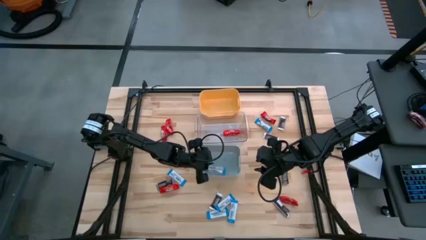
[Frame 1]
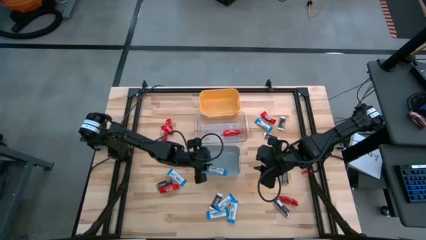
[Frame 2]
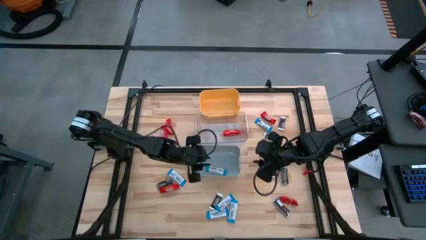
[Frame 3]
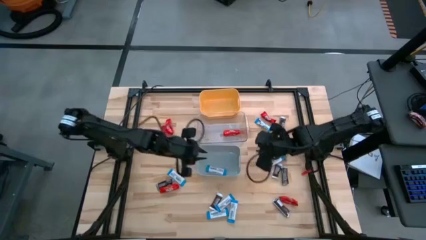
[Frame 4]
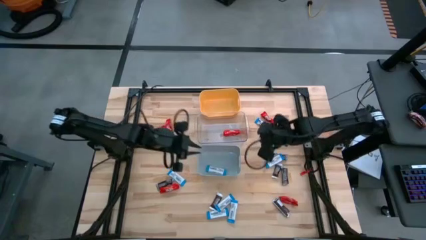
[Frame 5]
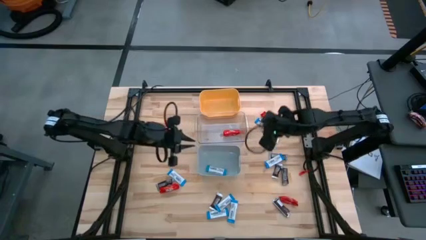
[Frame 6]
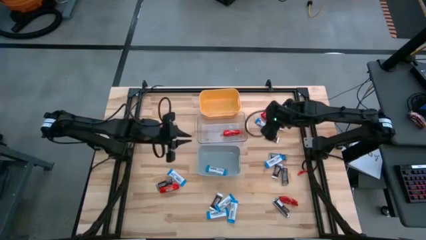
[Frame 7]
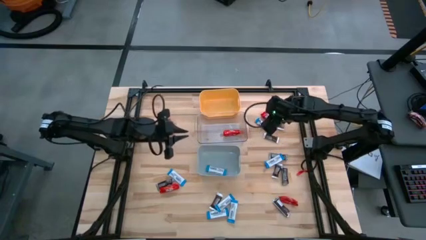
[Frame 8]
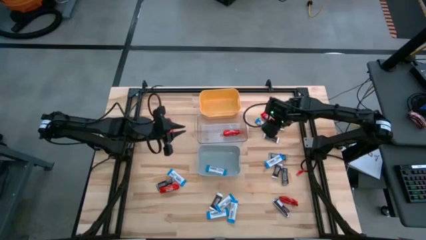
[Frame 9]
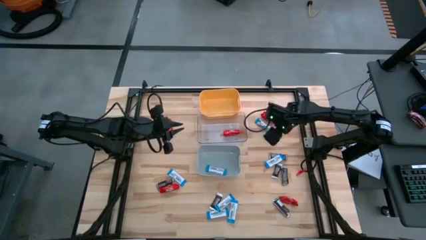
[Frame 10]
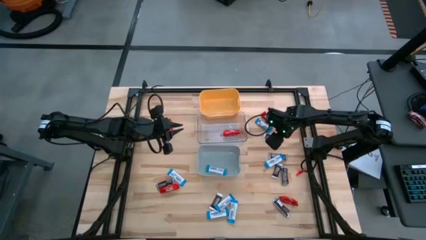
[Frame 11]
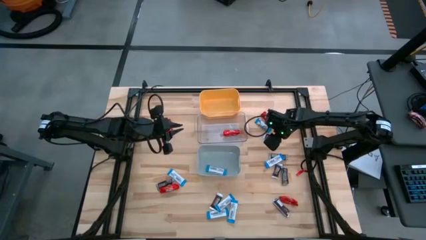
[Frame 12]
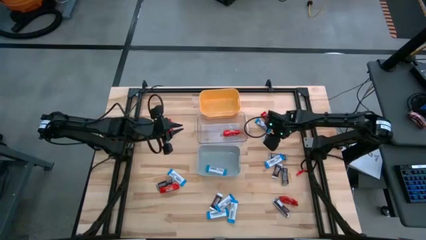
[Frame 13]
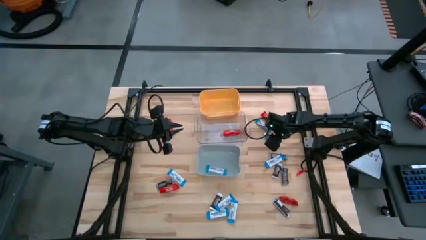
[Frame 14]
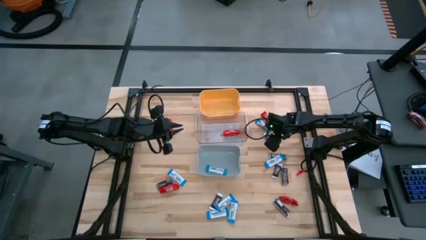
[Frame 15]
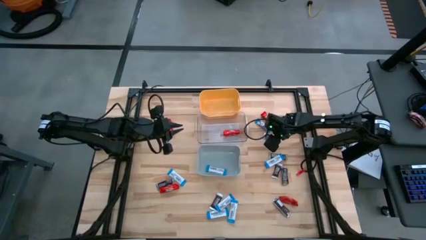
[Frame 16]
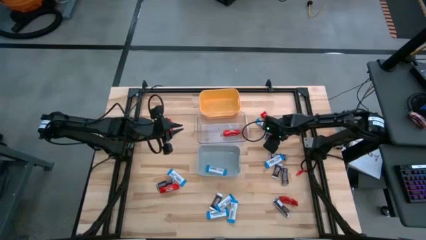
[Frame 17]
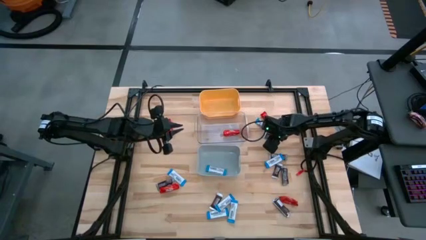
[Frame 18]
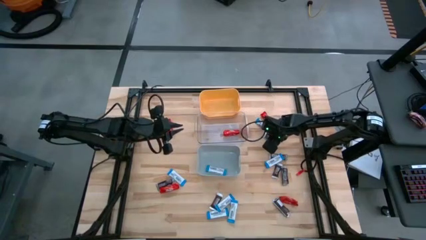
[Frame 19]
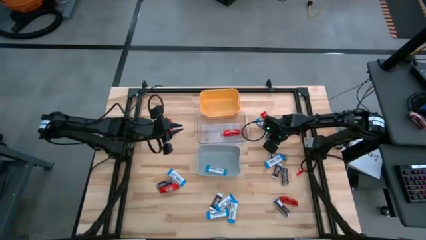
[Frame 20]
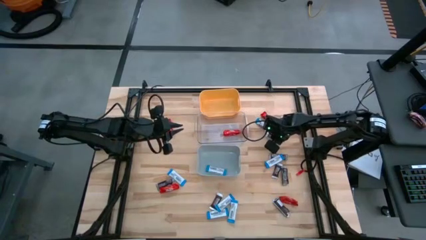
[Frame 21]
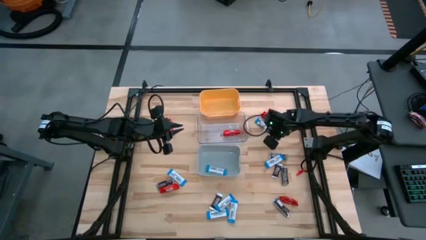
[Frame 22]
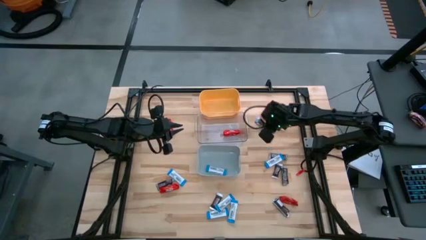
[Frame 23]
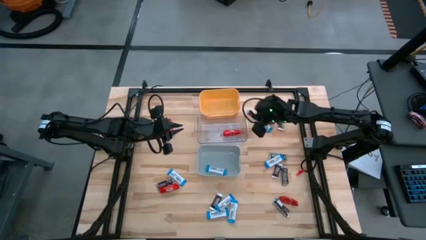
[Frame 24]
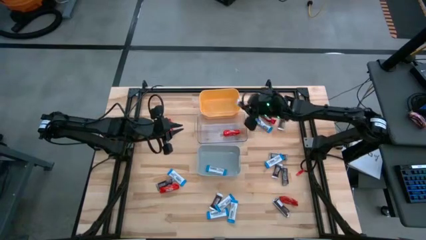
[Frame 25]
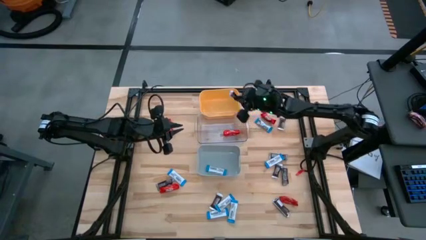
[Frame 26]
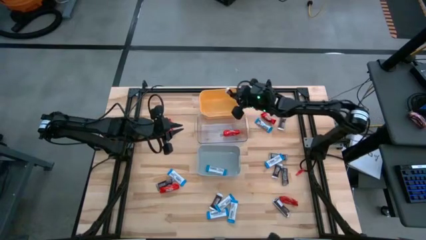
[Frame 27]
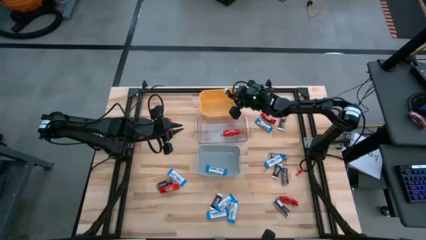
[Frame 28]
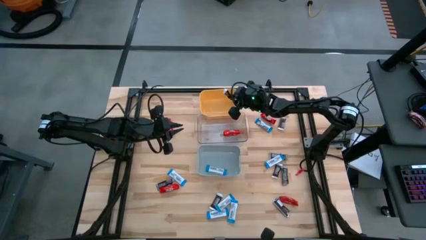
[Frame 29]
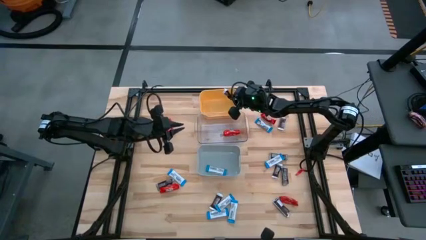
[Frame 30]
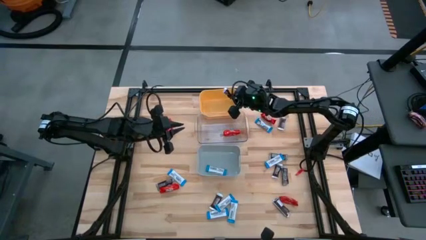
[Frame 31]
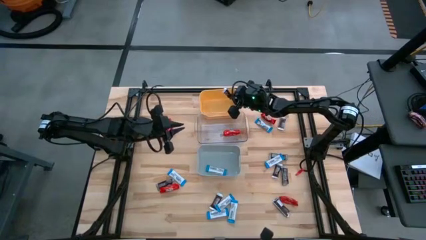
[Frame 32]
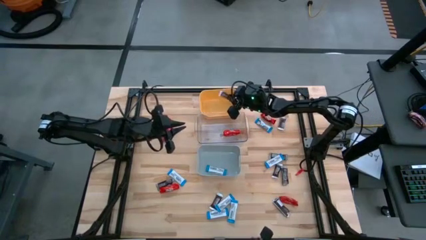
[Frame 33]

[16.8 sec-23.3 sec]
Task: Organize candy in baskets
Put the brown chocolate bar into the yellow bin

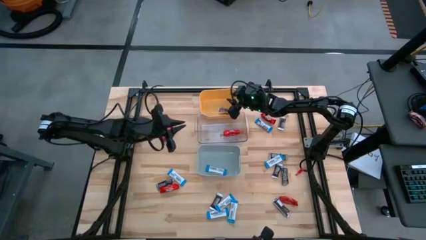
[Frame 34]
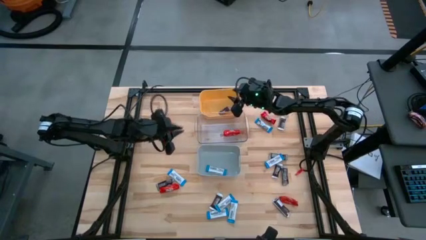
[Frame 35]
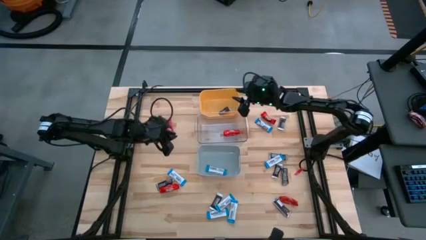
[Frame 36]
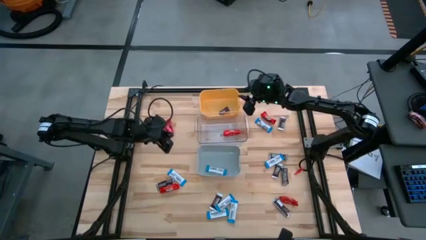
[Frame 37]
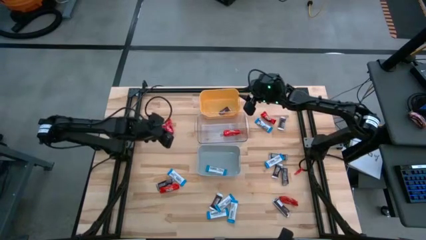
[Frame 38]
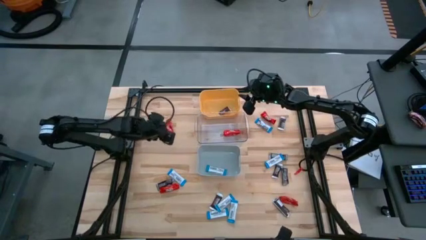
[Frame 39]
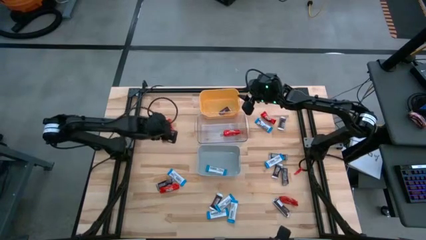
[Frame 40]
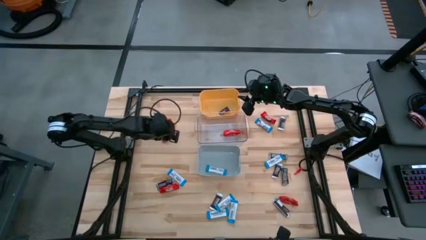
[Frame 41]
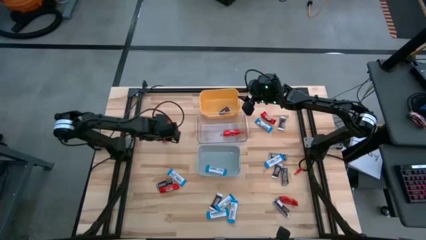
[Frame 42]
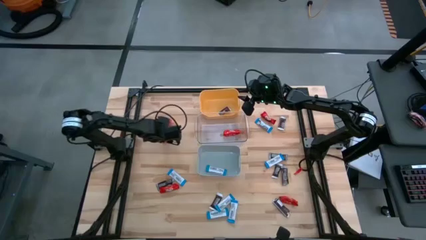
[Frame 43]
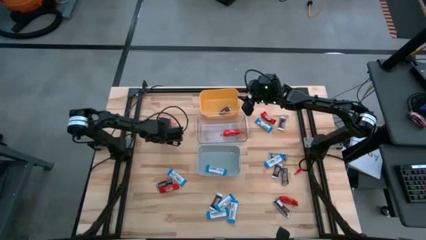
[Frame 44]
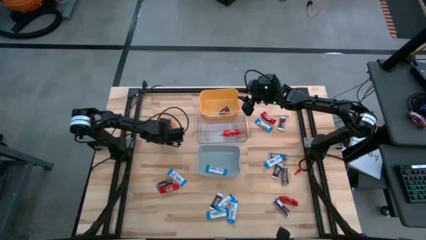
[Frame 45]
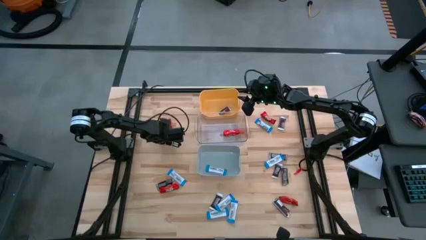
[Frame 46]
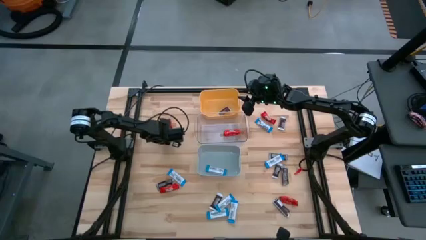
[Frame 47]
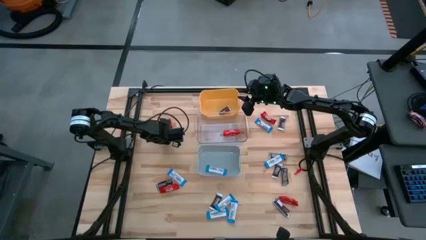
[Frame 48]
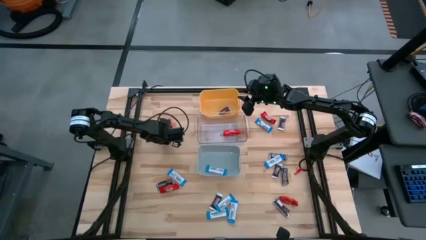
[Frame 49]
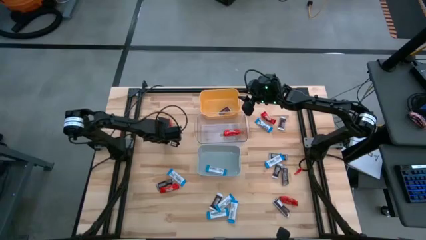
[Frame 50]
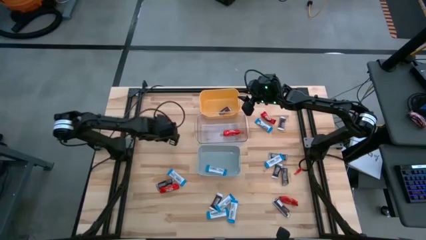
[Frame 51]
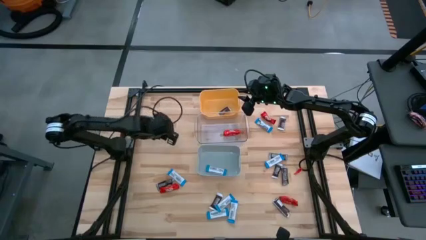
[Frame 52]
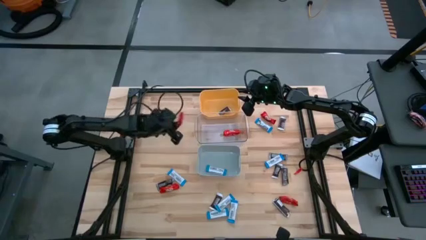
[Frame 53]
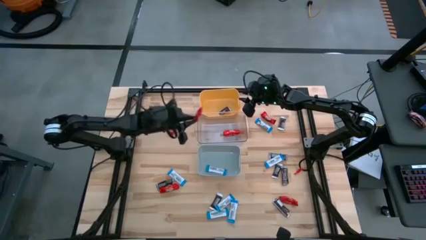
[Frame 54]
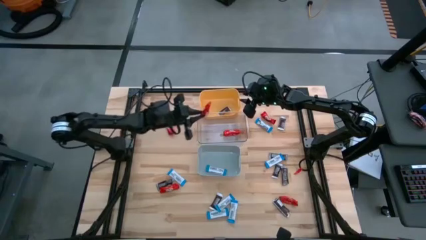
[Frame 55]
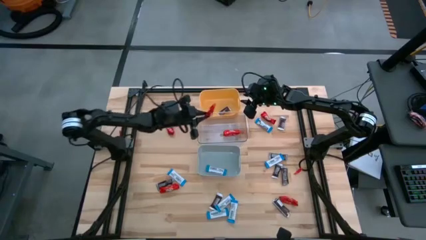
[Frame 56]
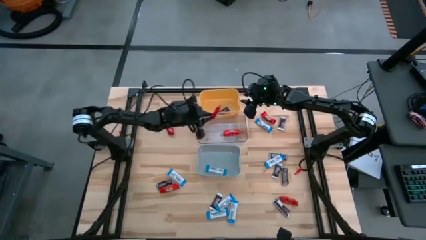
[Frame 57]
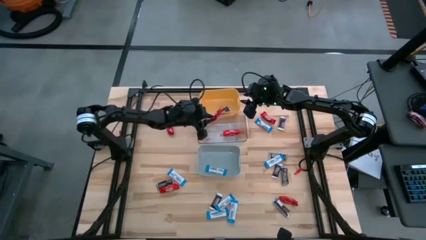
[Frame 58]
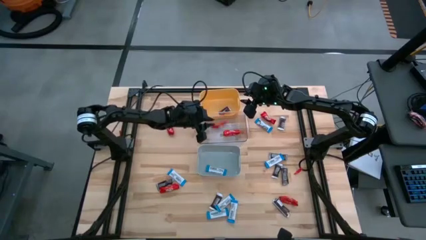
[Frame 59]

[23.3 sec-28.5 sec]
Put the red chocolate bar into the transparent bin

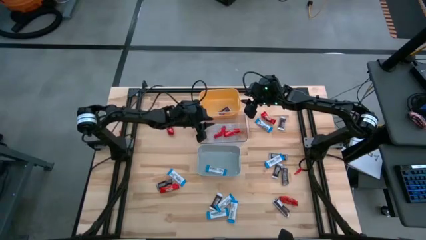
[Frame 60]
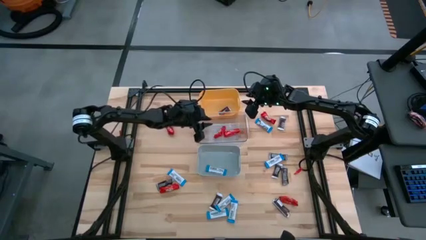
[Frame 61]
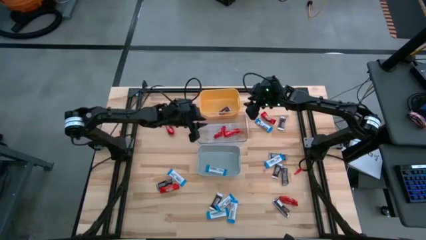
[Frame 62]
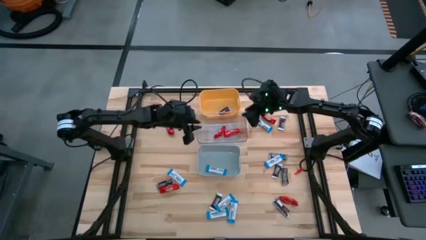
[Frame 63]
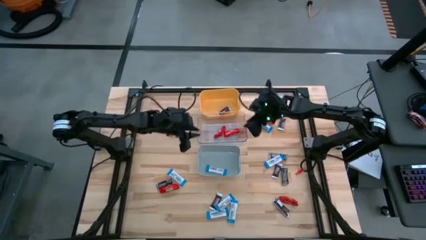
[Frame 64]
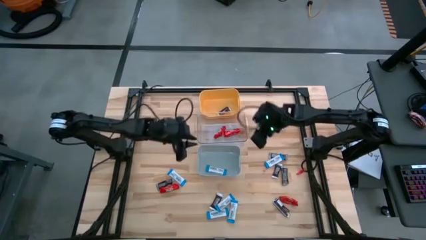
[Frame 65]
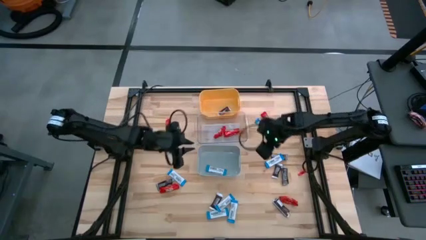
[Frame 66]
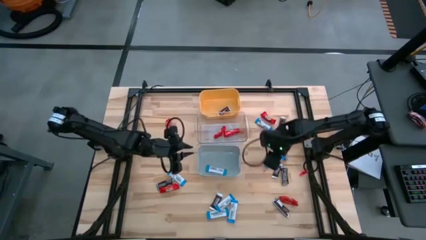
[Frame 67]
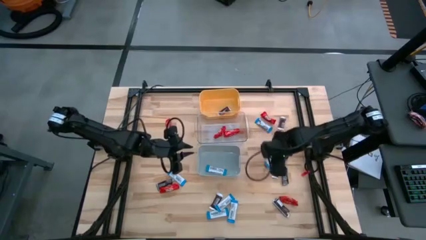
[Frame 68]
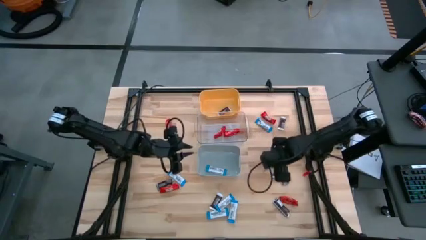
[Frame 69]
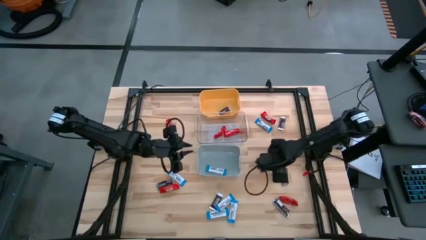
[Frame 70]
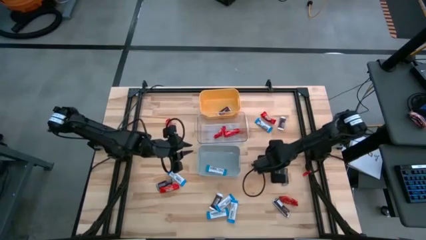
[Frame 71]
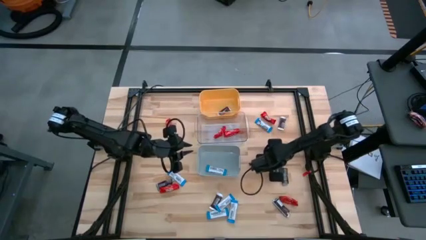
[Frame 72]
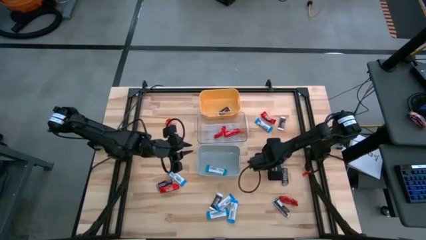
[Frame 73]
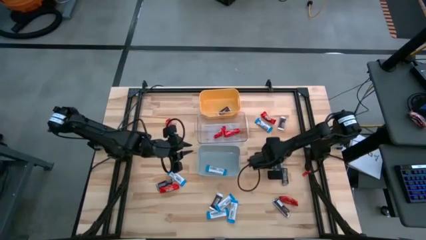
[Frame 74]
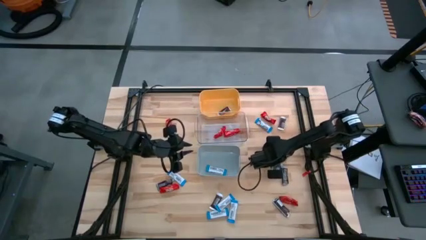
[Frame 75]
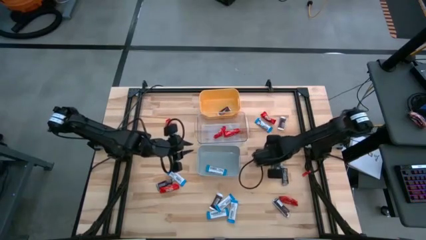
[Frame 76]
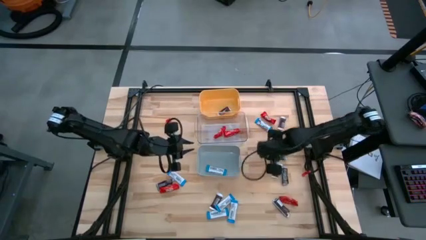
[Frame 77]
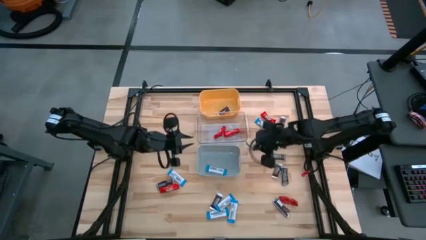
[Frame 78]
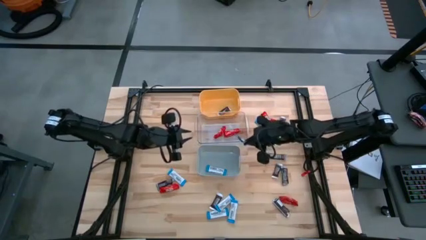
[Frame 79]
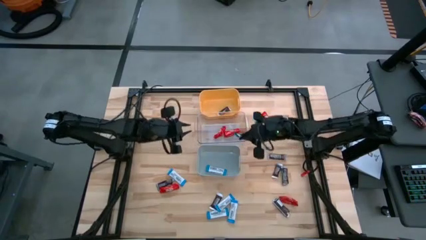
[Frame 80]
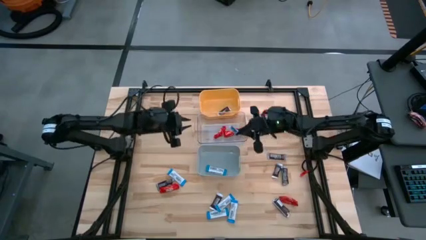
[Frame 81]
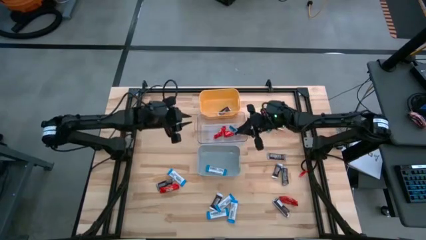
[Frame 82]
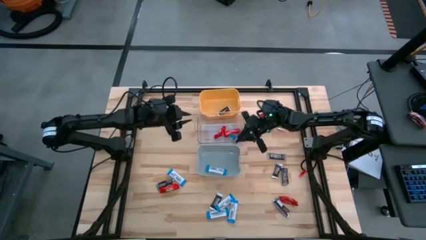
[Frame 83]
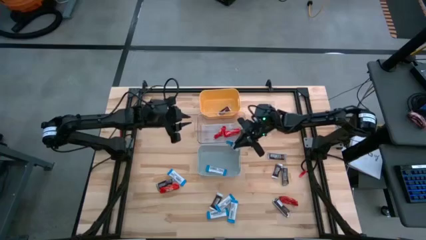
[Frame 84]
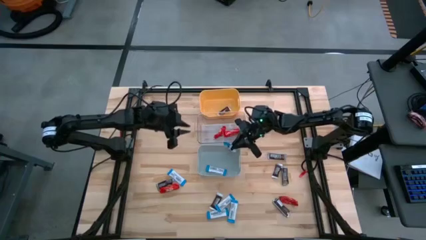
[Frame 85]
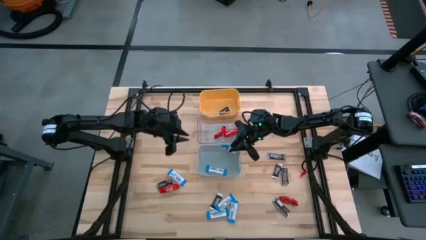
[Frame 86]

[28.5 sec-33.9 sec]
Put the white chocolate bar into the gray bin
